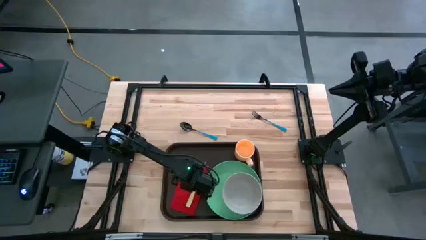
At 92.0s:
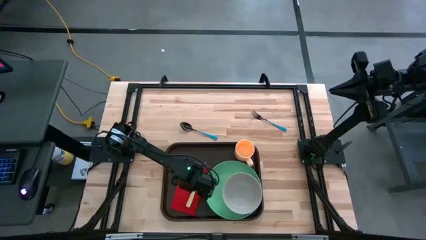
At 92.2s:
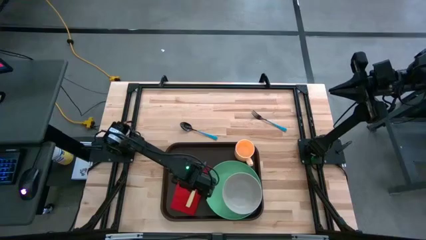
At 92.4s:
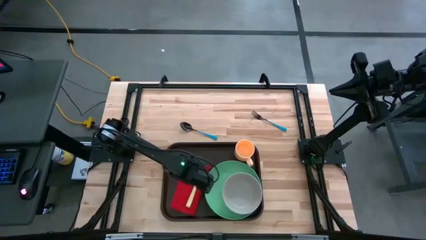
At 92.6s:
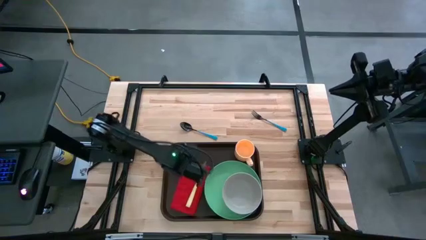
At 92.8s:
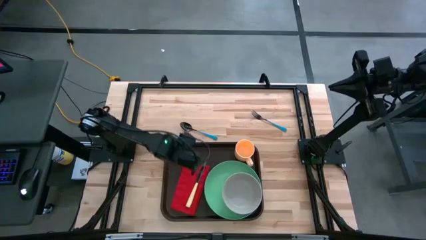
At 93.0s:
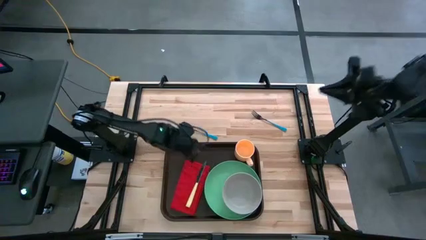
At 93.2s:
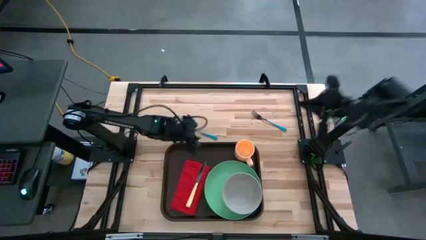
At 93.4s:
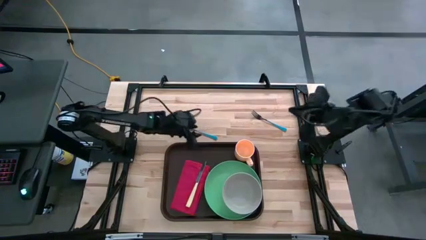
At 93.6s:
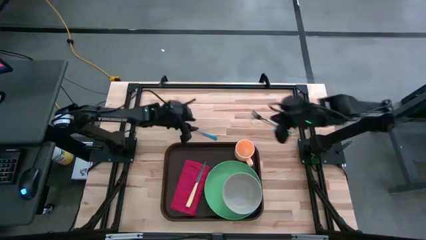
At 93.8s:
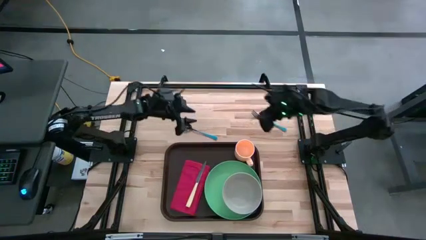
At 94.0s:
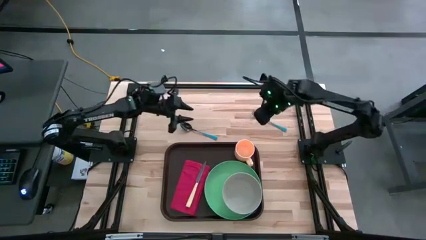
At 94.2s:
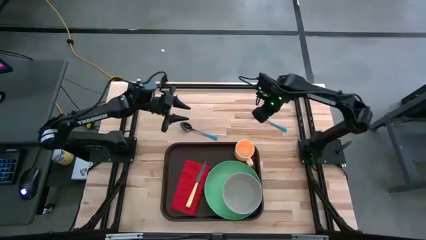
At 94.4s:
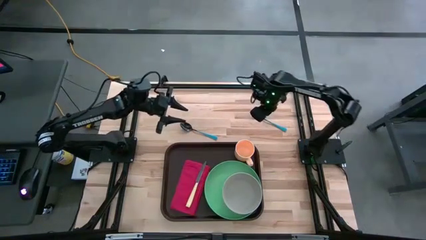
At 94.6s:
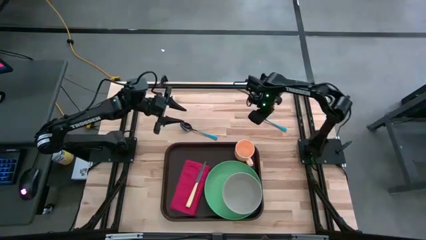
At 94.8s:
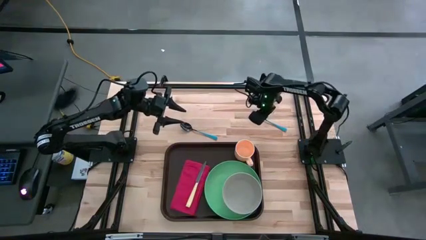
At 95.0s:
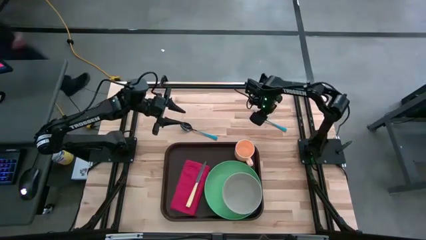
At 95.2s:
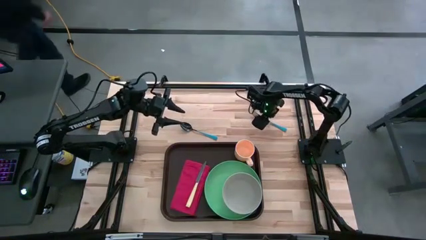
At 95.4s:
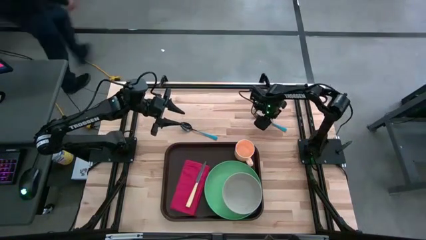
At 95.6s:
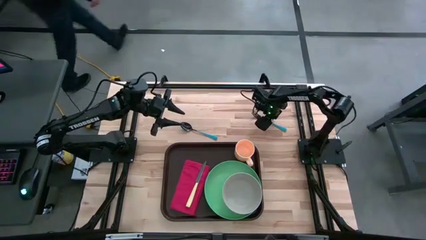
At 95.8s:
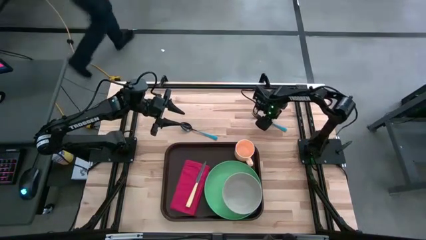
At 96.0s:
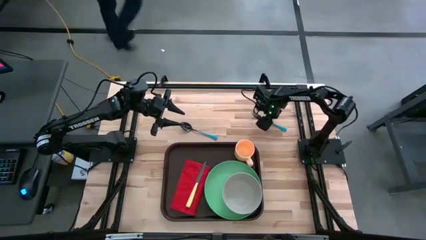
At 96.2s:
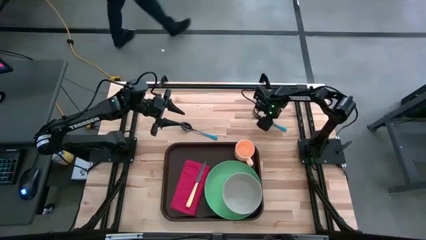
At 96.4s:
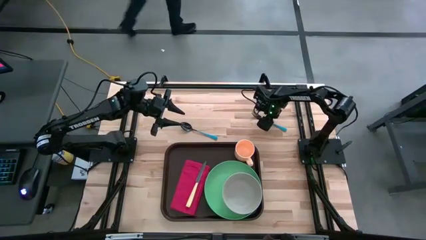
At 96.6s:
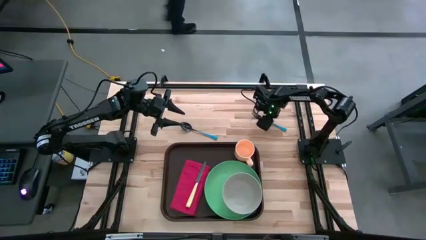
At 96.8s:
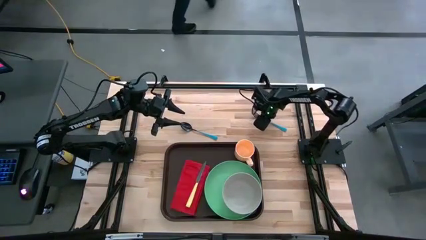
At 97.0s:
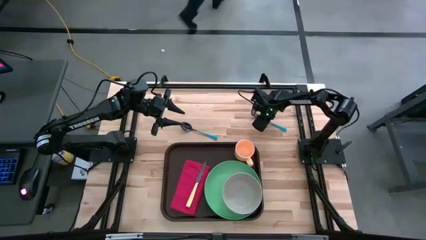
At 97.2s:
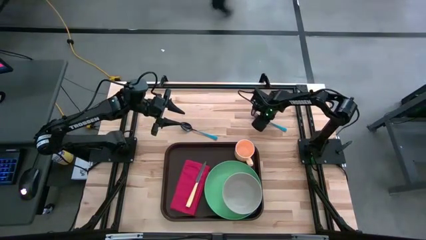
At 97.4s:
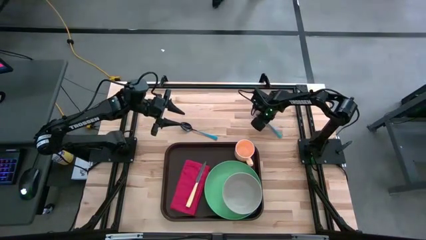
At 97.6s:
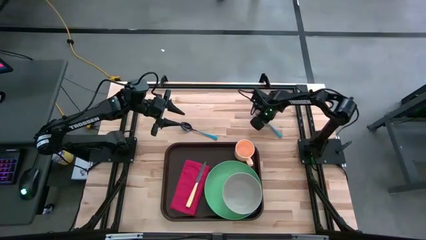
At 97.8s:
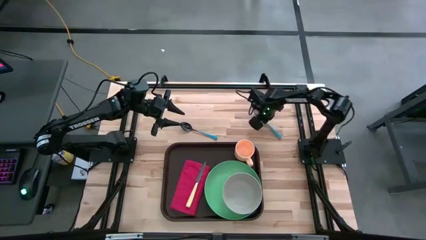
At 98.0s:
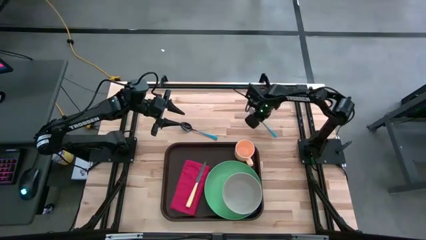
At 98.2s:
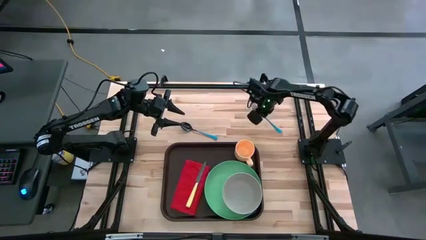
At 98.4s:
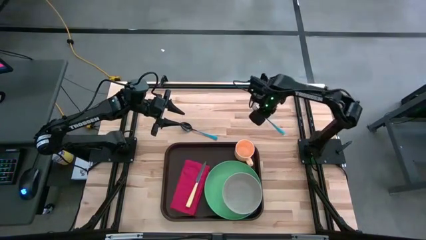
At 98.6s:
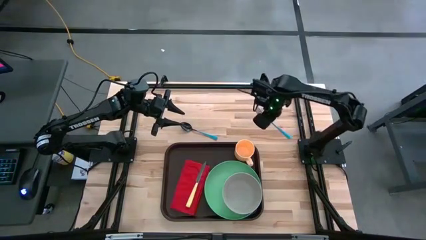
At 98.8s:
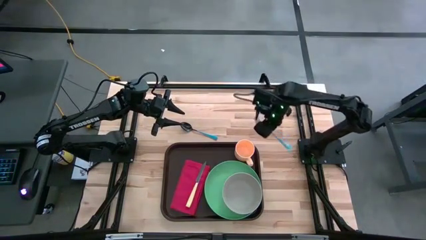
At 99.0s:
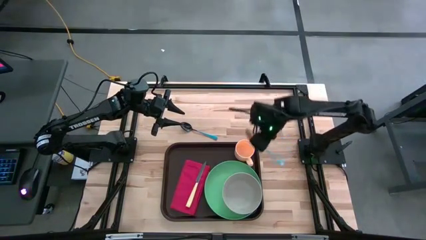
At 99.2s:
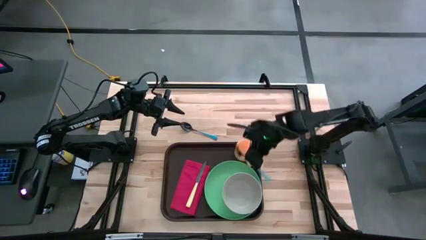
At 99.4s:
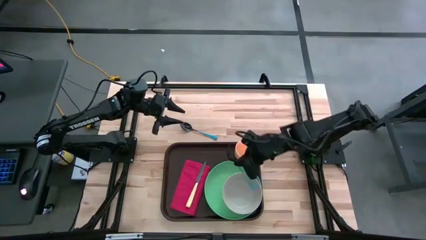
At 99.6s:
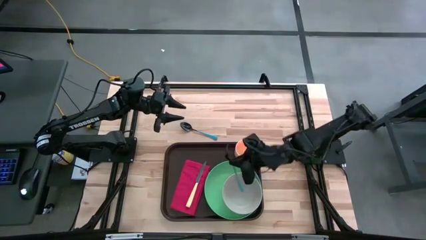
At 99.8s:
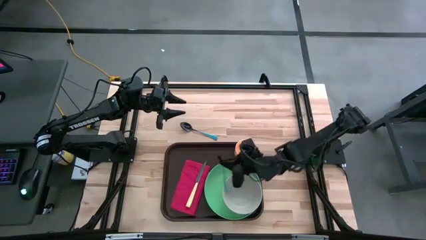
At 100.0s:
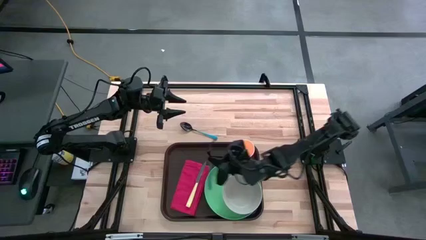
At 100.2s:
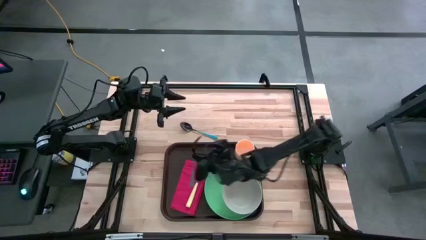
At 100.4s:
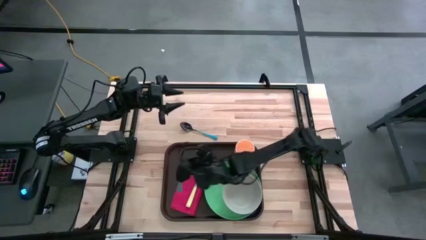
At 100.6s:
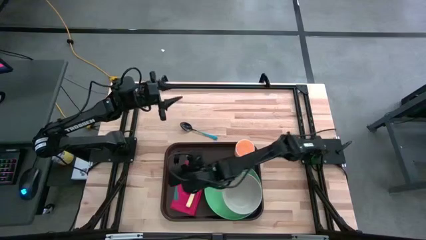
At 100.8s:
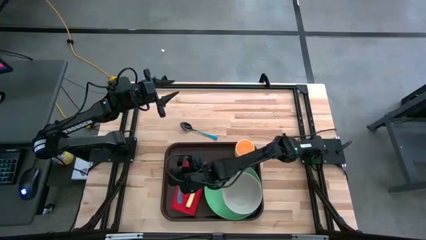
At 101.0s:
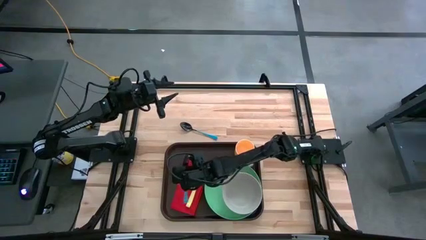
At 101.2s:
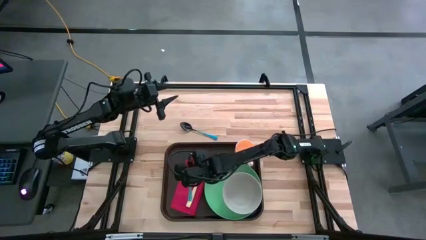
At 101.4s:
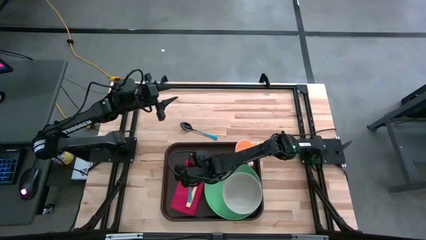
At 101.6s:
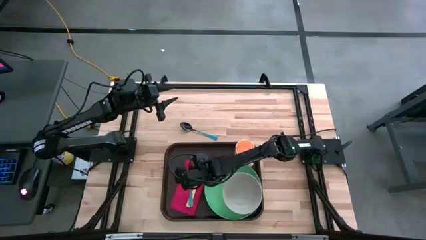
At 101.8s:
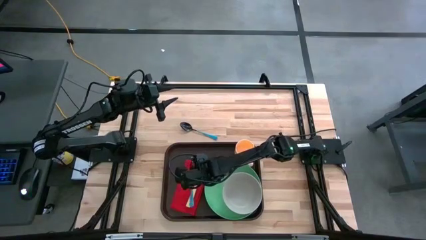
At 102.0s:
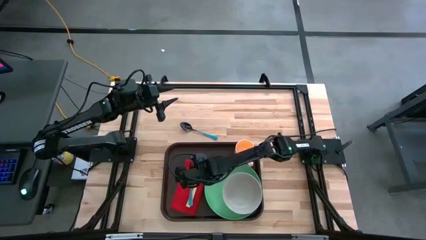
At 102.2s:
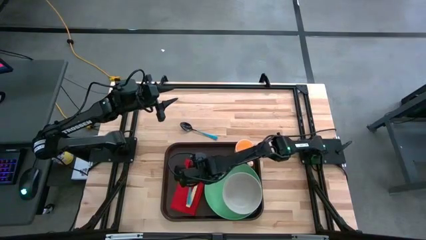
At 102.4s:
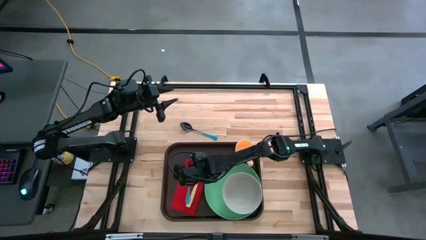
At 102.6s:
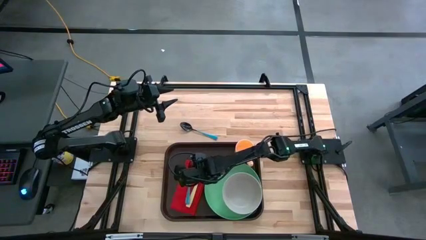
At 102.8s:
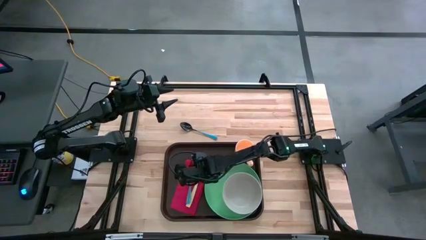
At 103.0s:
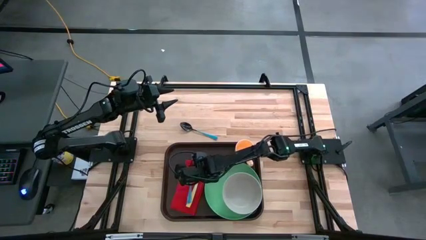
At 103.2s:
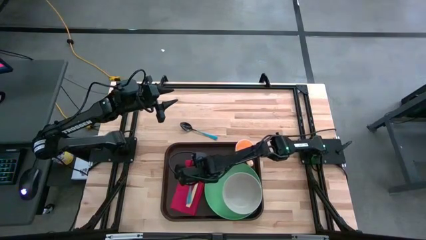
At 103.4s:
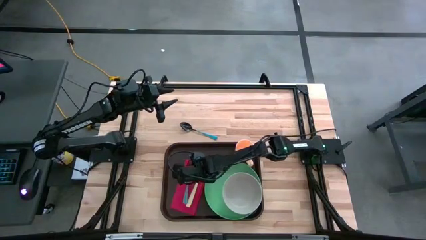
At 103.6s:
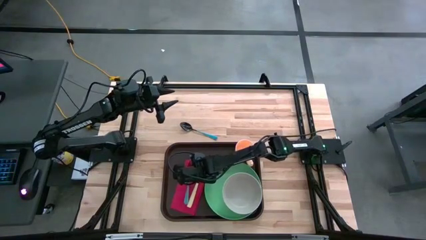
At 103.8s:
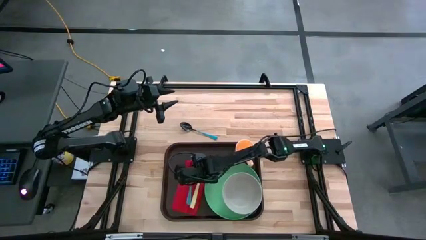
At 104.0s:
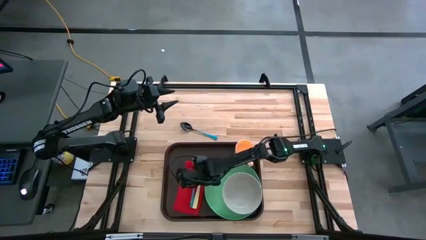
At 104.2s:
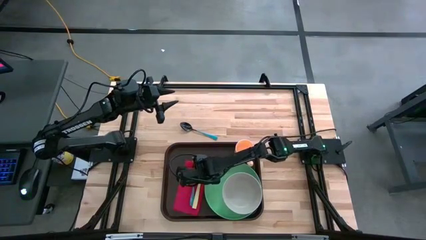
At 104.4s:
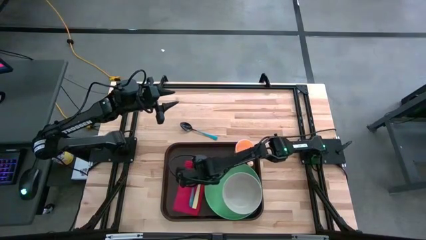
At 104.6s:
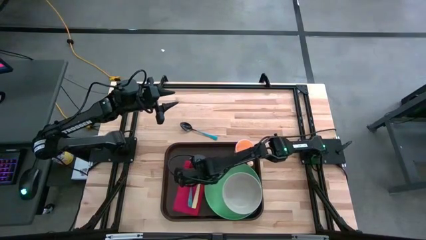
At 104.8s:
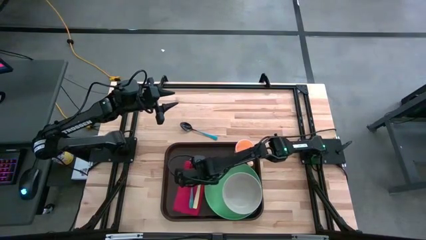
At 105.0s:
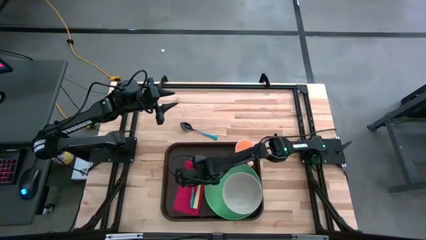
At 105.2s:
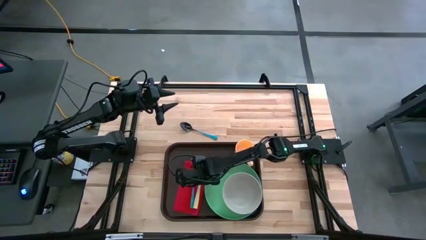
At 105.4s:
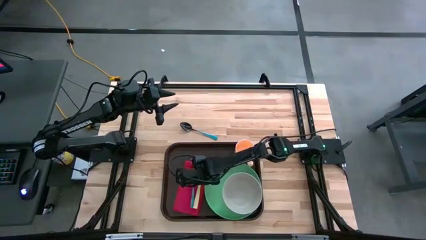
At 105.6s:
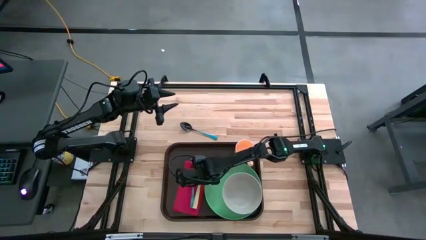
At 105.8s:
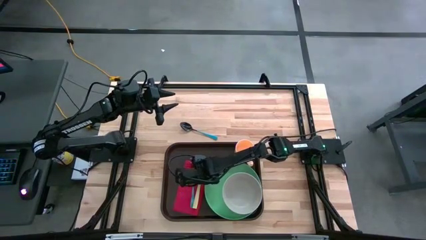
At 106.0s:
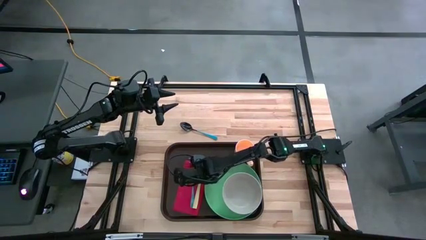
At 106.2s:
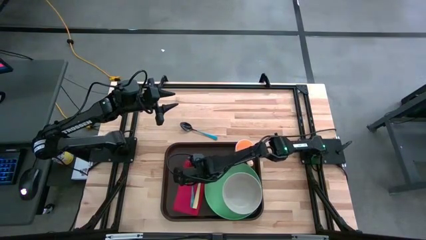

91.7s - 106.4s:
Task: Set up tray
Put the blue fork to the left of the yellow knife on the red napkin on the brown serving tray

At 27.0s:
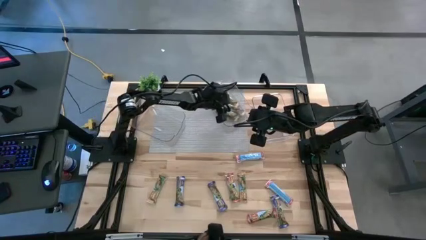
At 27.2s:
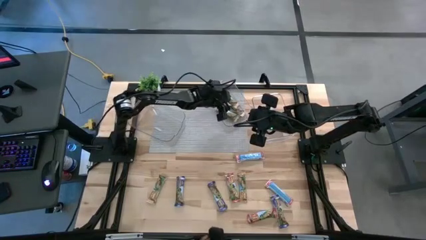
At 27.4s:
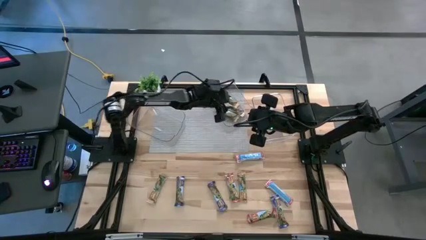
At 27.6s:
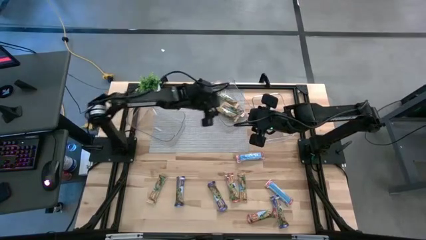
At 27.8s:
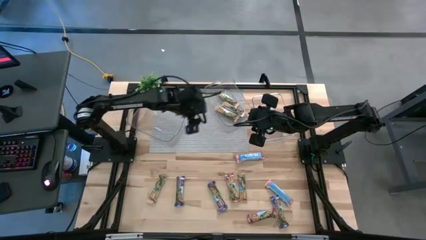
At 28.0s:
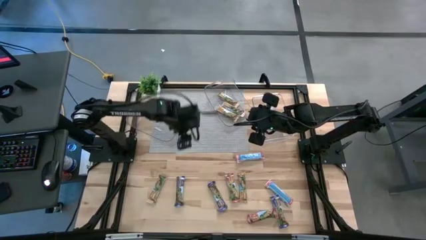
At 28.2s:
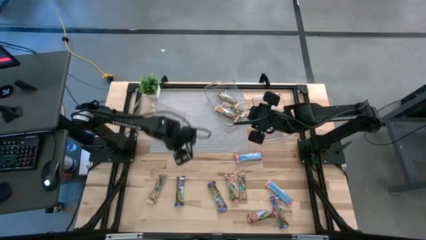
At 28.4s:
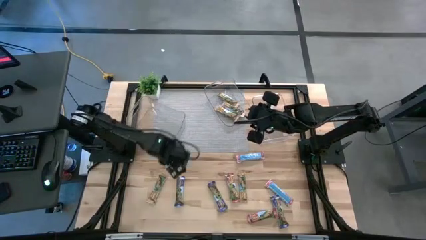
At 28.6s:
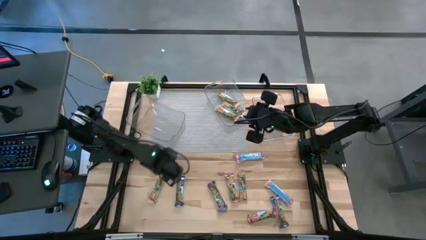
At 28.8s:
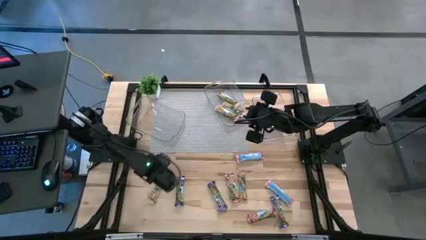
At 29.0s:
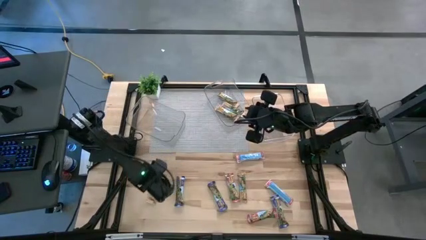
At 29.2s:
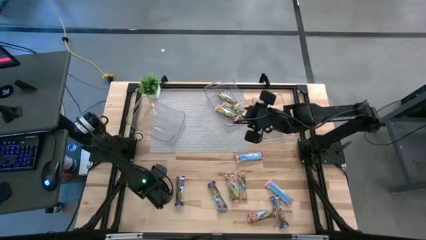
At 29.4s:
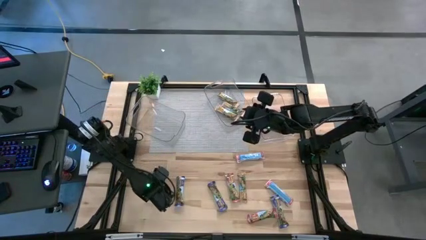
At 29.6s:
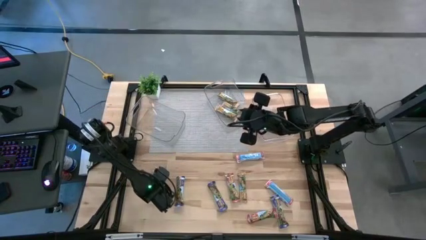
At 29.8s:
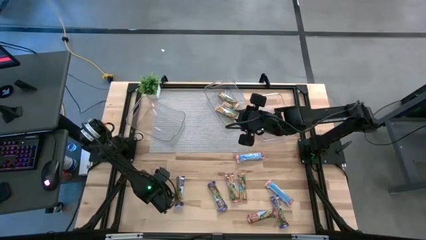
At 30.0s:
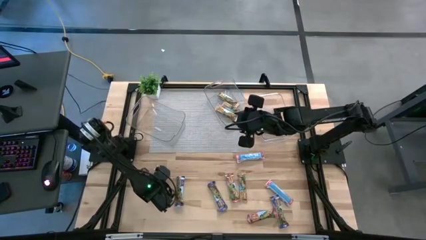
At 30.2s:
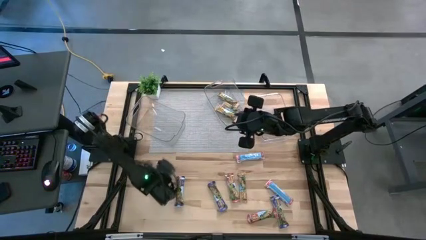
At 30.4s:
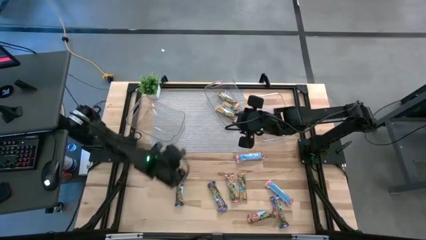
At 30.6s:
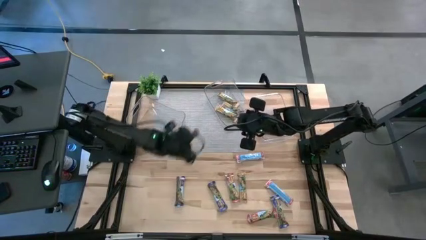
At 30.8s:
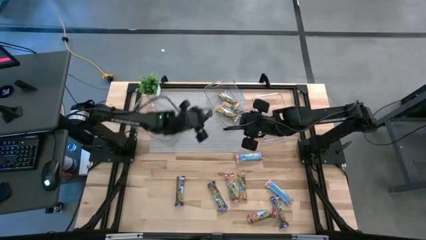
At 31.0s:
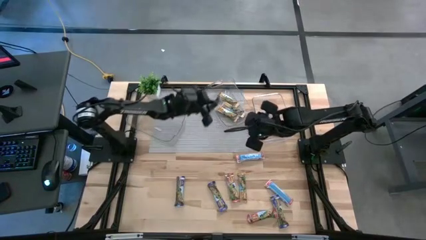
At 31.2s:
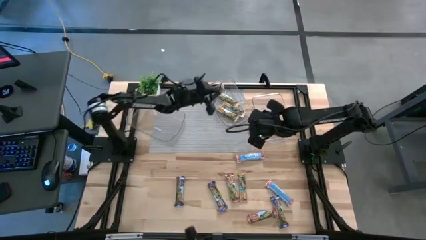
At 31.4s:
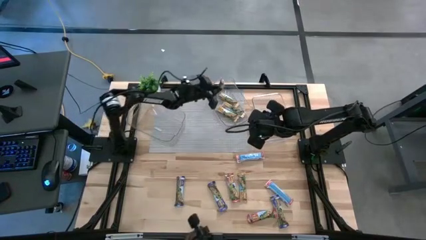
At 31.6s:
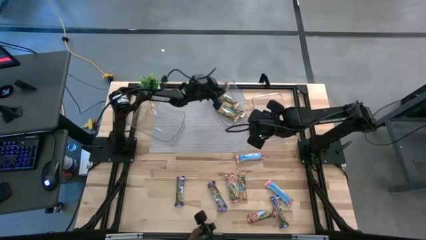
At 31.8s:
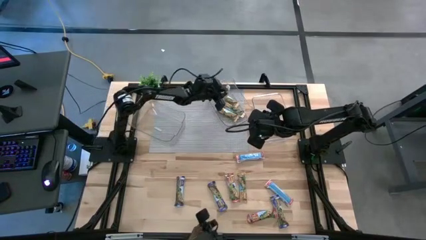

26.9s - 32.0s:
Task: Pick and place Granola Bars by type
Put the yellow granola bar into the middle transparent bin
